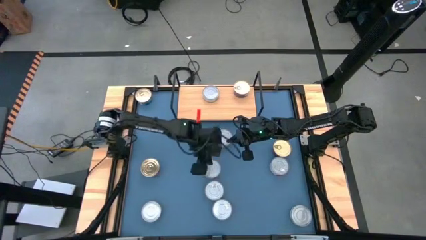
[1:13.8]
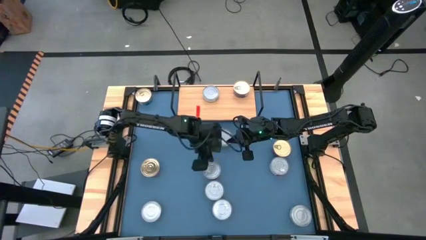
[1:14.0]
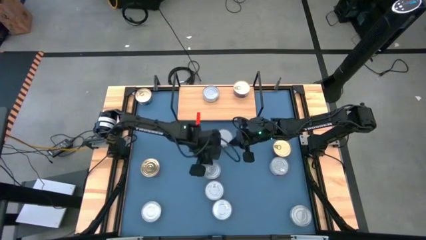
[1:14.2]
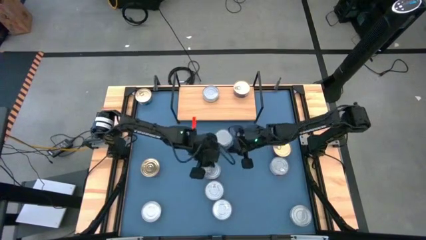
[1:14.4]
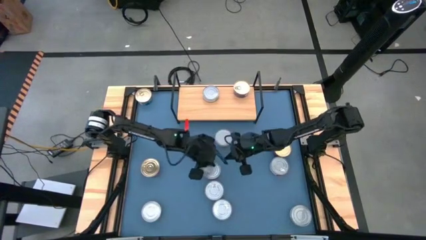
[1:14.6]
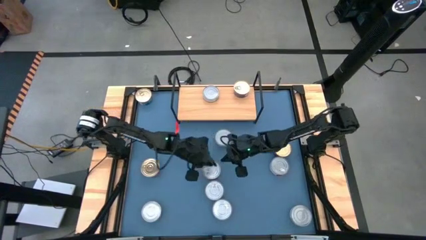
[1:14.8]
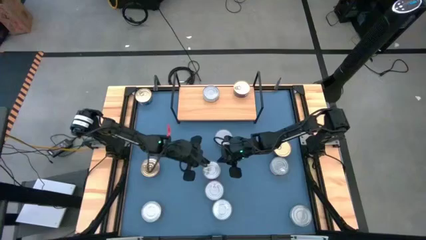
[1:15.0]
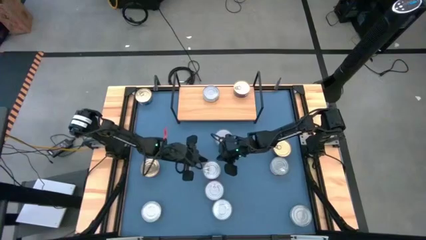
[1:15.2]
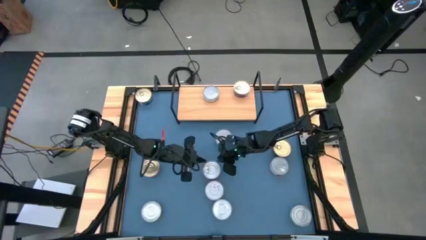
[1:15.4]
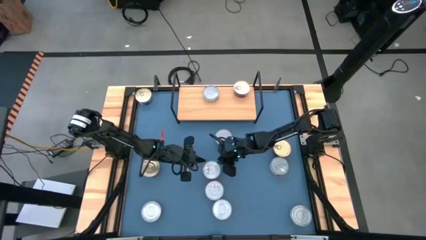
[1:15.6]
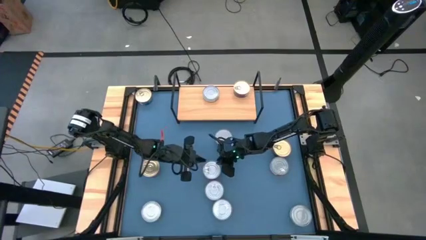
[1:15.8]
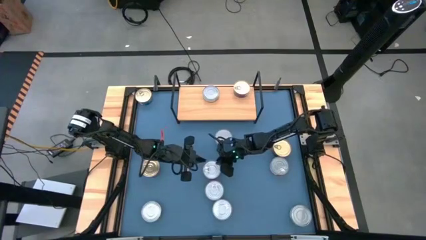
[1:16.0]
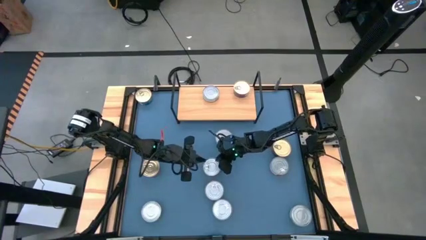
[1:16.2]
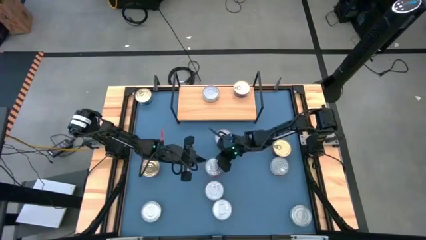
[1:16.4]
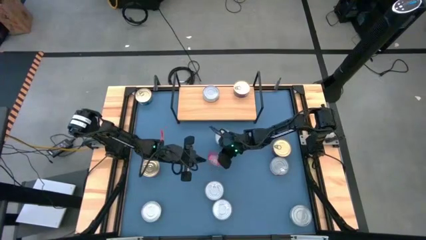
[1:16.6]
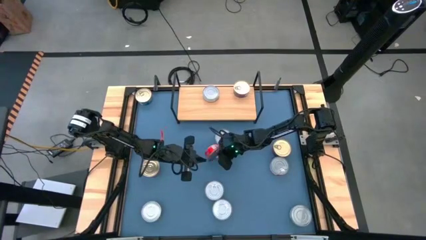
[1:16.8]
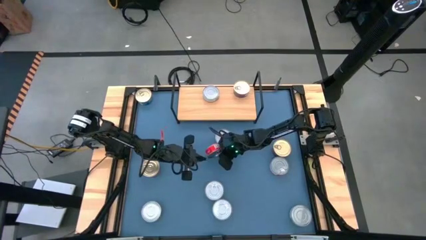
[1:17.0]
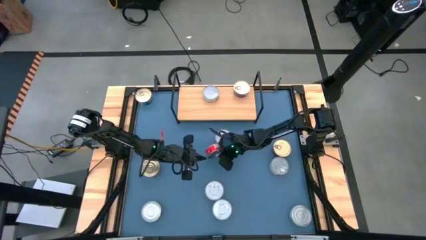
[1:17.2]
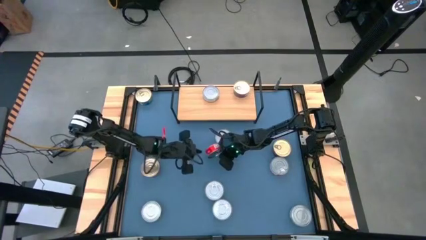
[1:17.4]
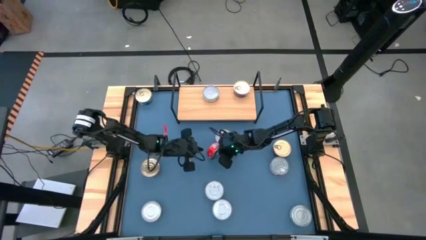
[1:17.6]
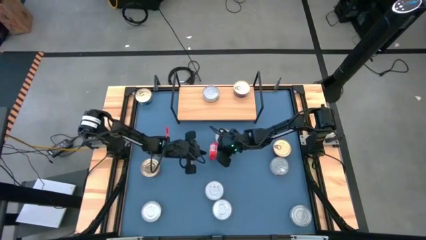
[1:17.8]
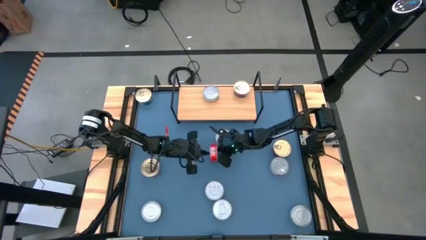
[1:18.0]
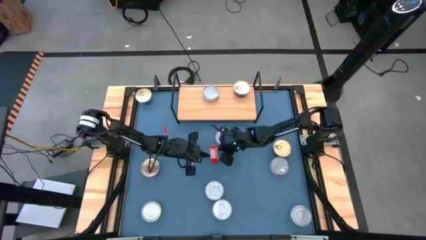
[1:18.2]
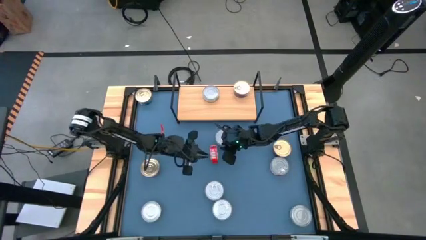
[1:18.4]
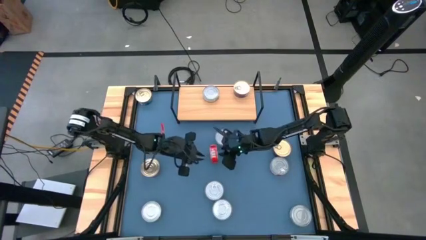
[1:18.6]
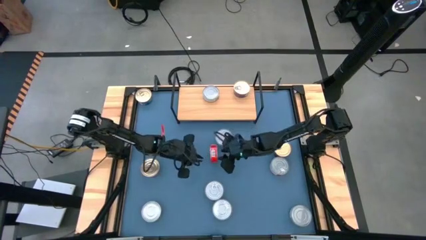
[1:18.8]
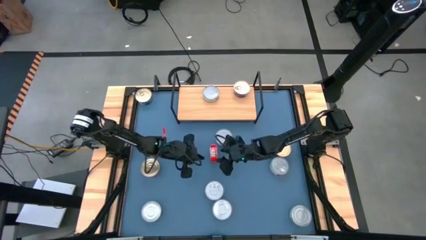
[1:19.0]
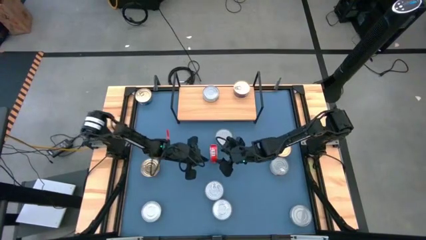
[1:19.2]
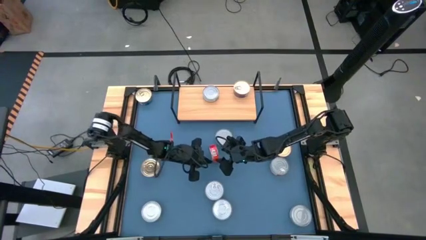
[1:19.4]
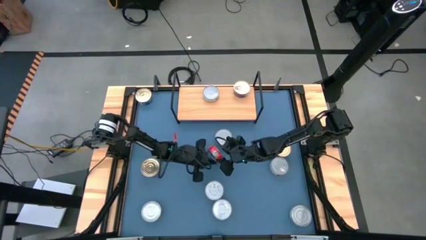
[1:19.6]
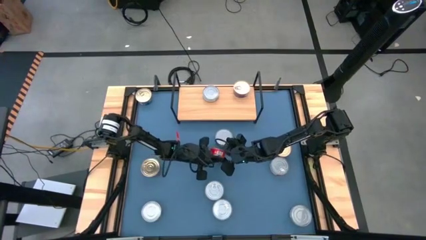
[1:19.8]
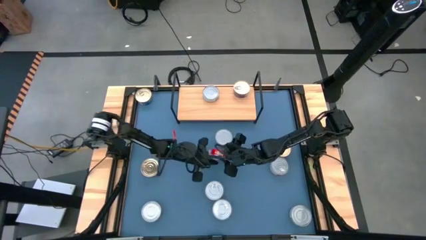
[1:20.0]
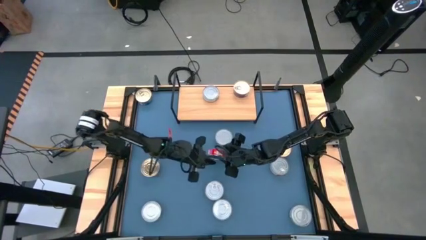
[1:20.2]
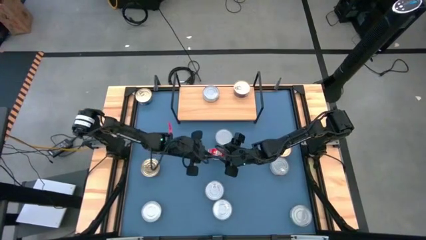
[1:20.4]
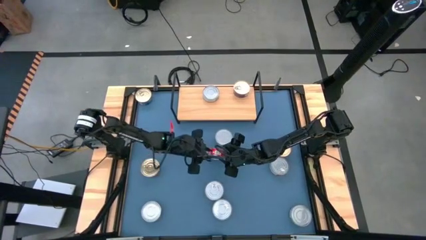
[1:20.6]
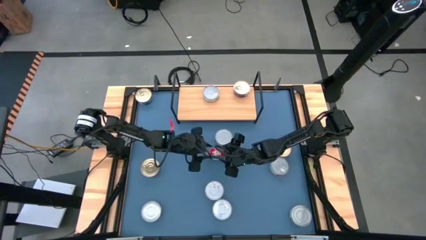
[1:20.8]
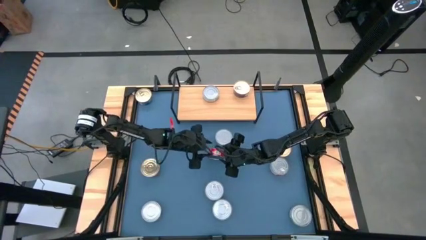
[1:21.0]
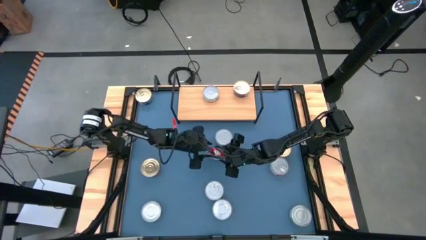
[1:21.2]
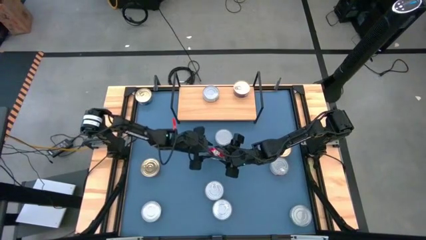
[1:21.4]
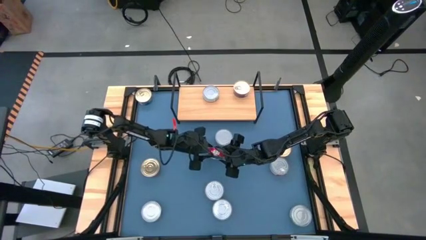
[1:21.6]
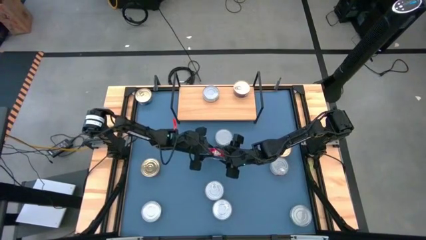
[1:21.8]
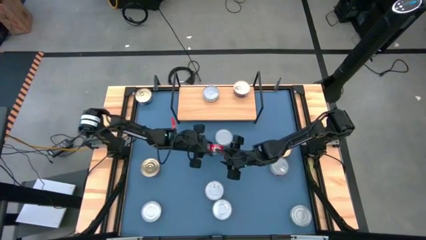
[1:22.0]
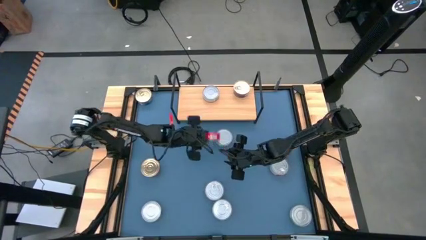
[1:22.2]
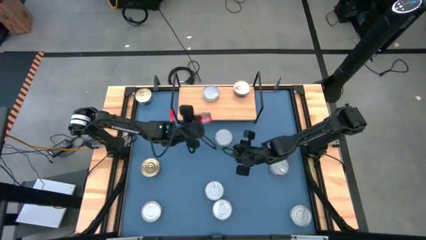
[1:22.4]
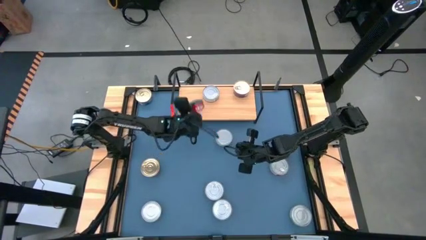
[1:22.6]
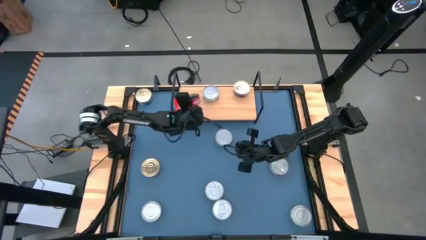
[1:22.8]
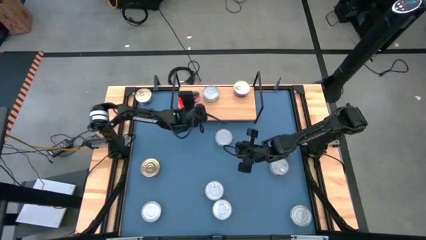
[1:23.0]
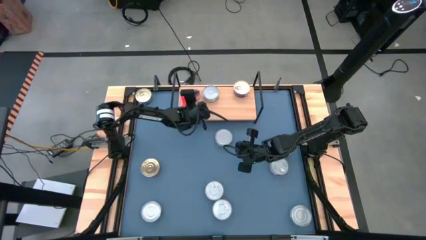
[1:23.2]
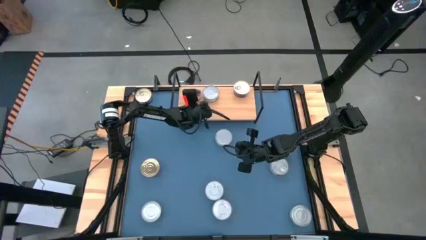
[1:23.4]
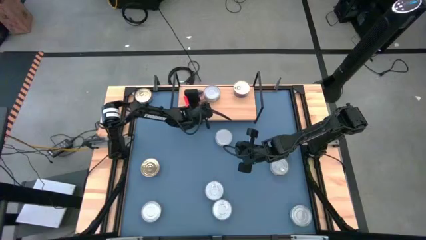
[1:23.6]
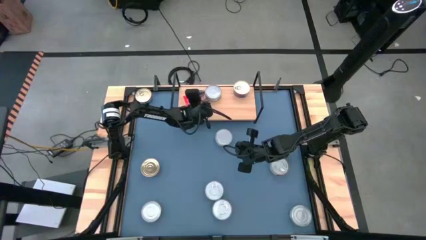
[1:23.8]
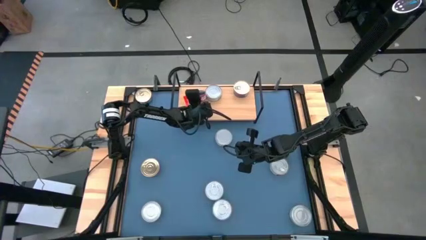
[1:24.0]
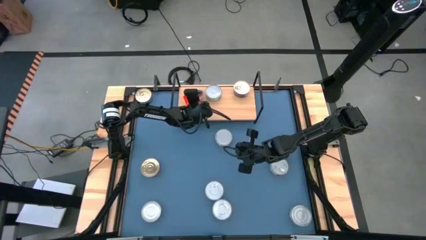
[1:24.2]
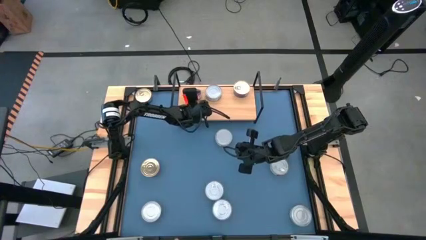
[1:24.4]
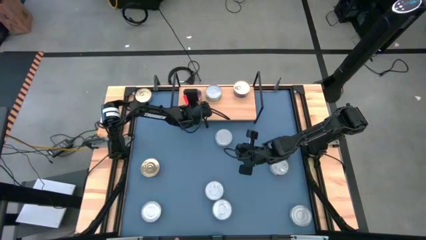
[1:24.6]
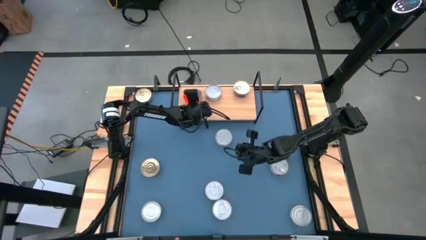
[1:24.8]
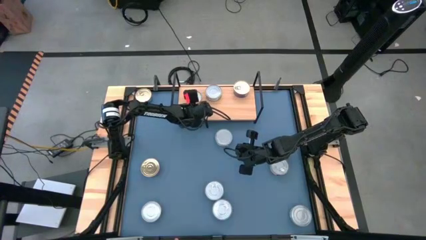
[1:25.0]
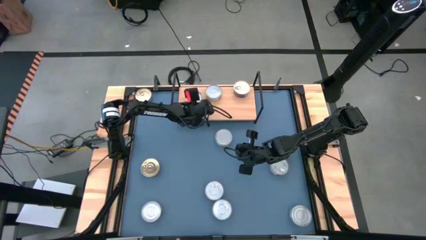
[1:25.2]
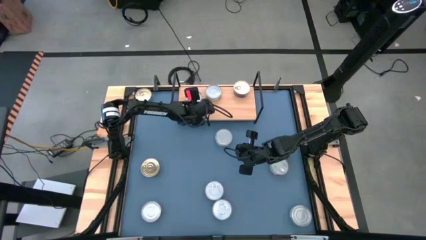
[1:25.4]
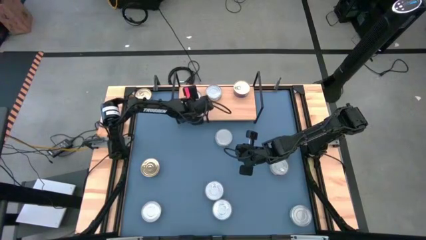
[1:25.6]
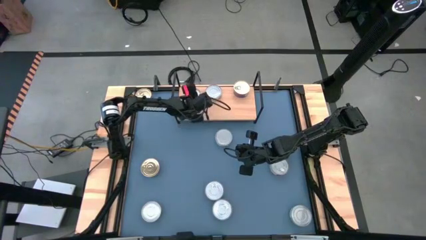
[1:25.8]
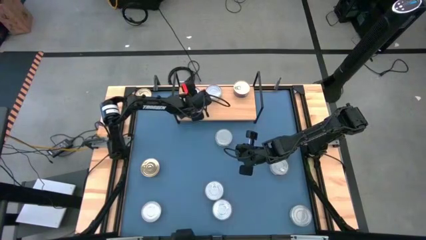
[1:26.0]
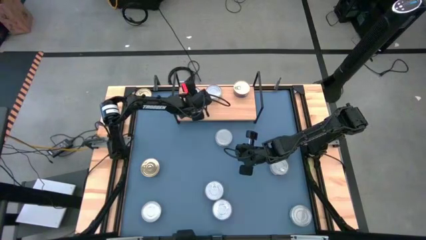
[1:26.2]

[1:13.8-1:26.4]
Task: Stack canned seafood by type on shelf
Put the red tuna can on the shelf

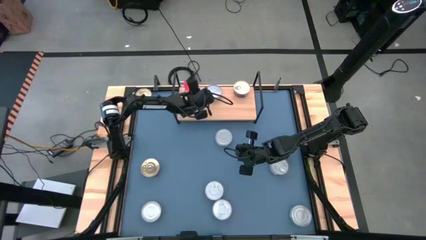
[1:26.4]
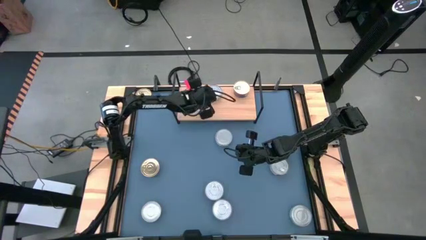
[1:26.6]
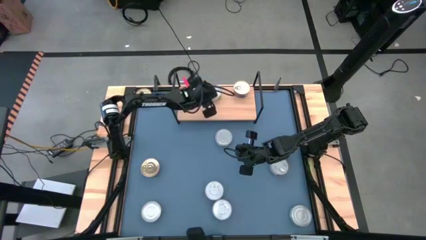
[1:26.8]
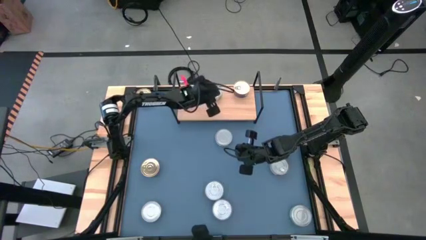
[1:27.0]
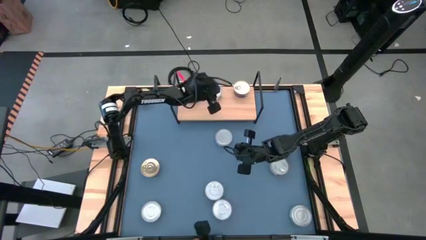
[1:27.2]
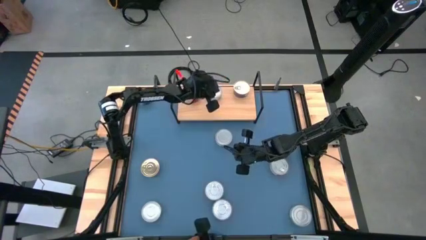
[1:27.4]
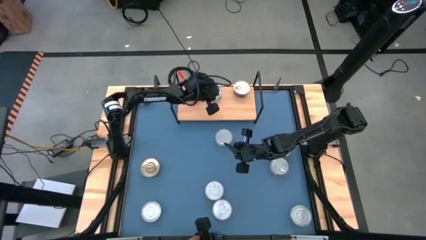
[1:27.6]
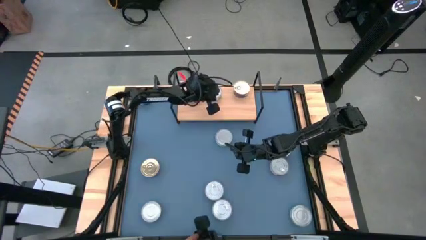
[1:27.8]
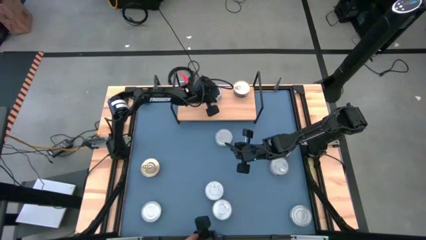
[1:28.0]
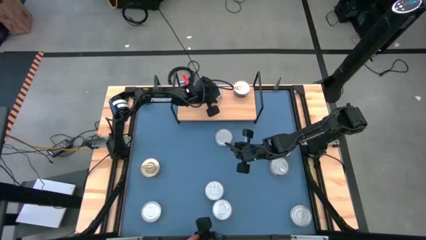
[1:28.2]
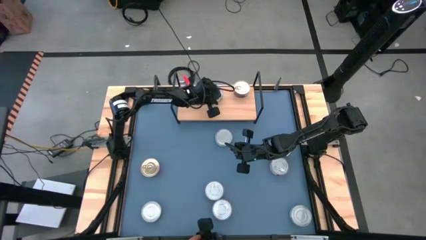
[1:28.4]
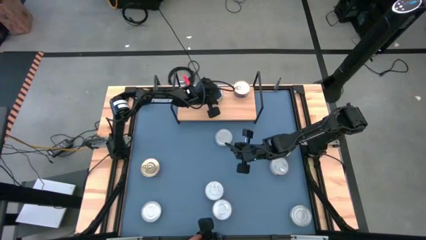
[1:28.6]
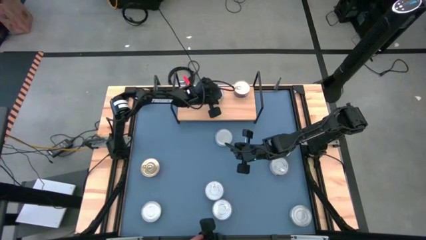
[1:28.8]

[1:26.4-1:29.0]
Adjust the green tuna can on the shelf

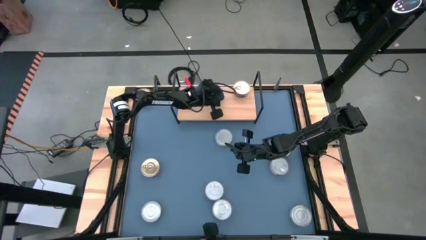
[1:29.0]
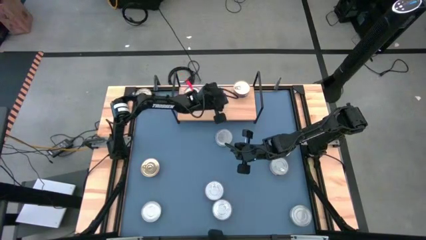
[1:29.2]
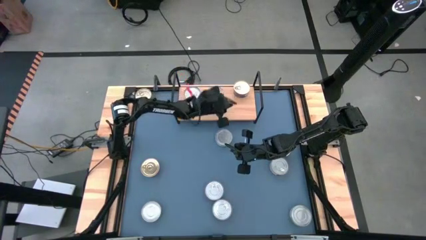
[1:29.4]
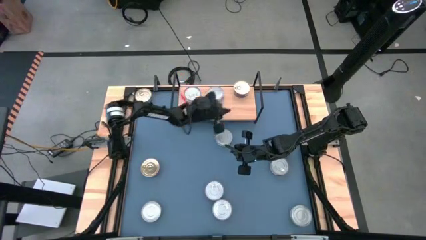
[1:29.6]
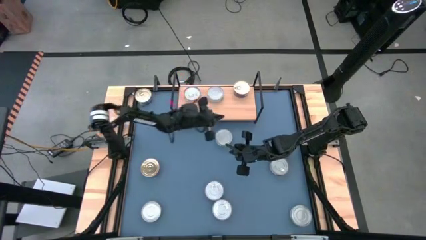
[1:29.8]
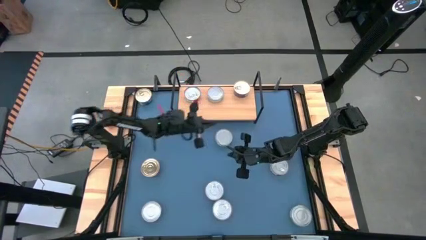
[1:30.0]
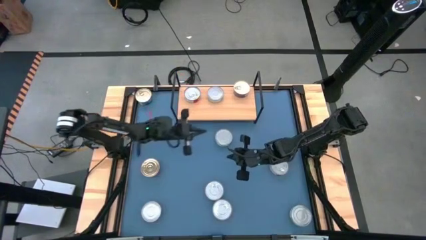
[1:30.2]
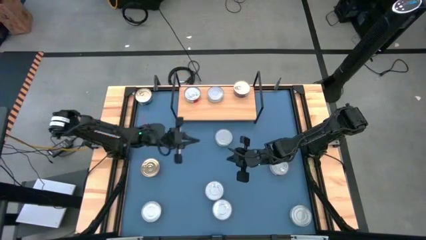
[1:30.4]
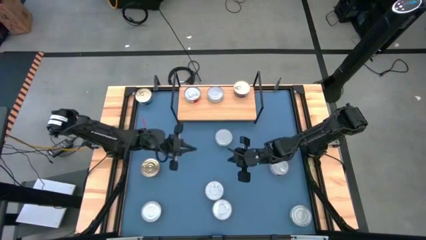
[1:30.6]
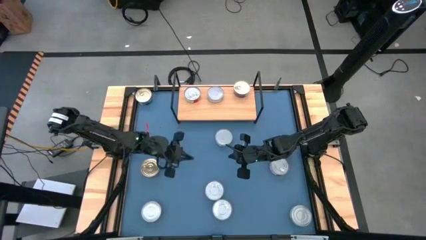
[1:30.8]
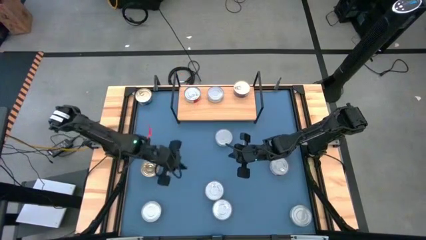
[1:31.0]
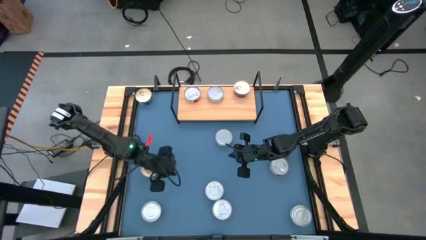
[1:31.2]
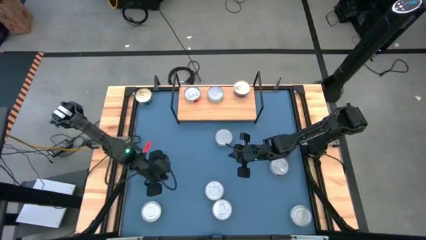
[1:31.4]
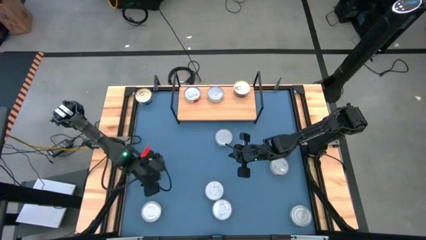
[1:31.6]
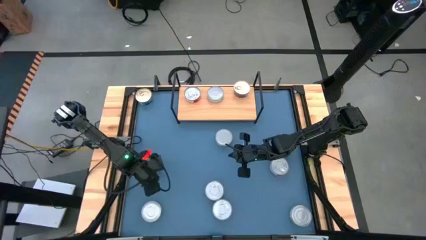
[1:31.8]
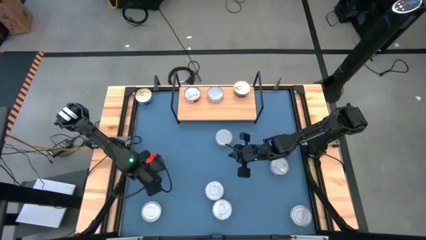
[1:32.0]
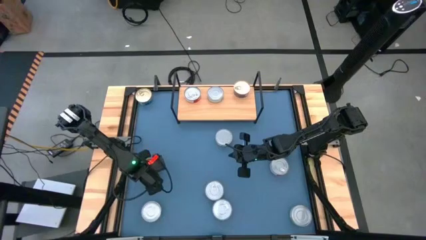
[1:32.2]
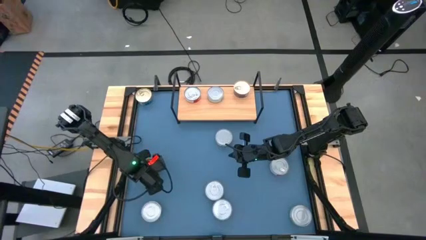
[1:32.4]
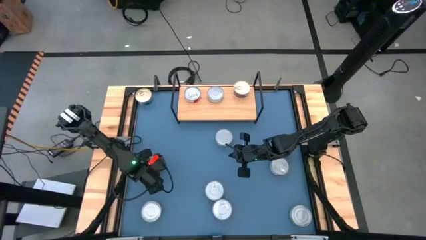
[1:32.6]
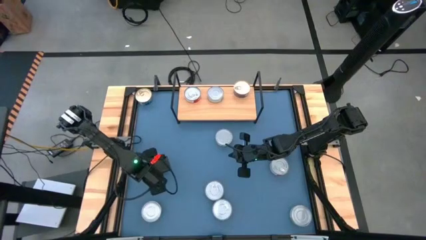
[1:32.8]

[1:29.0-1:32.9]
Stack the blue tuna can on top of the blue tuna can on the shelf
